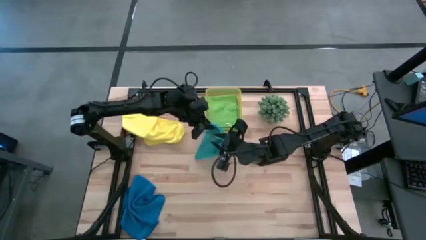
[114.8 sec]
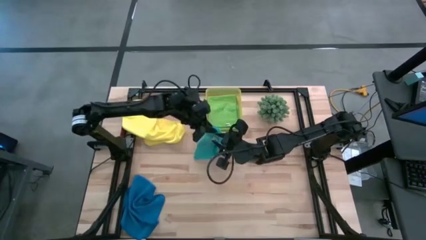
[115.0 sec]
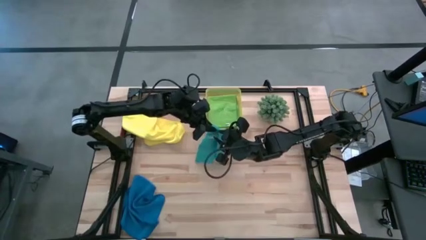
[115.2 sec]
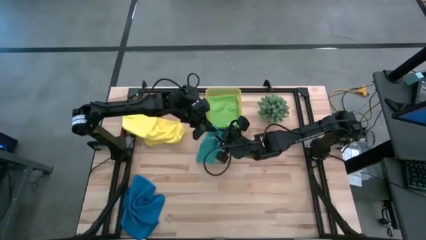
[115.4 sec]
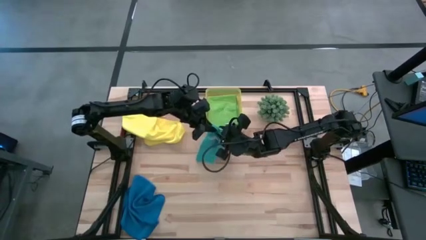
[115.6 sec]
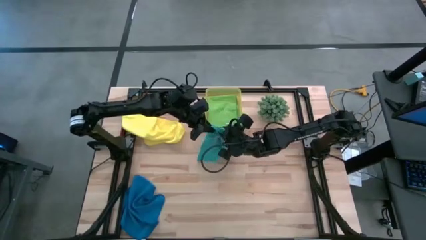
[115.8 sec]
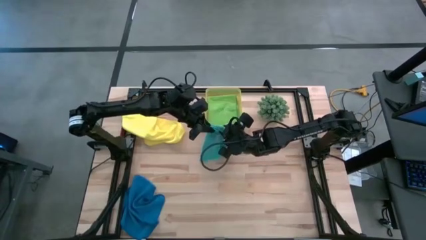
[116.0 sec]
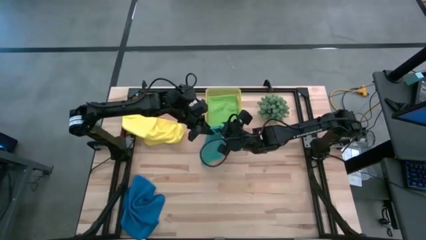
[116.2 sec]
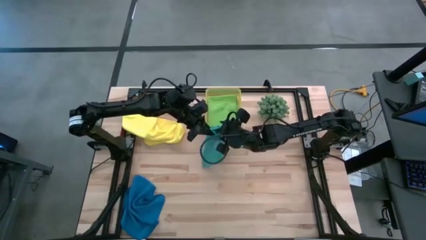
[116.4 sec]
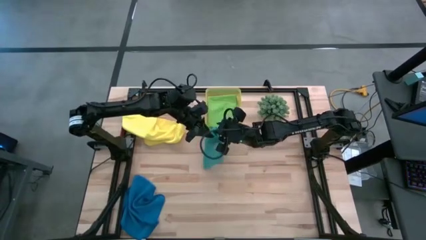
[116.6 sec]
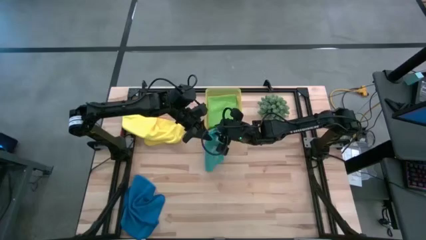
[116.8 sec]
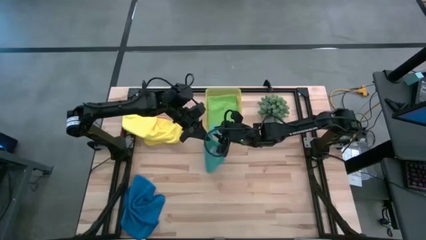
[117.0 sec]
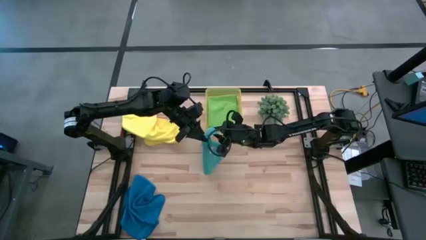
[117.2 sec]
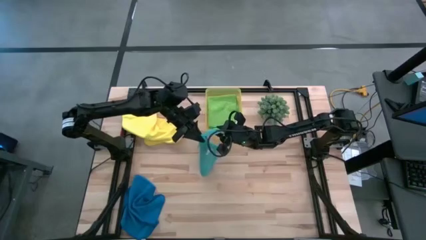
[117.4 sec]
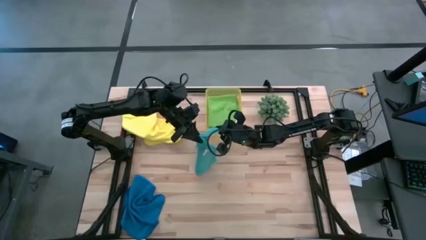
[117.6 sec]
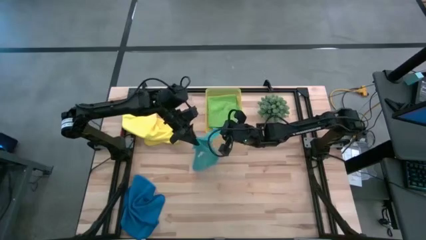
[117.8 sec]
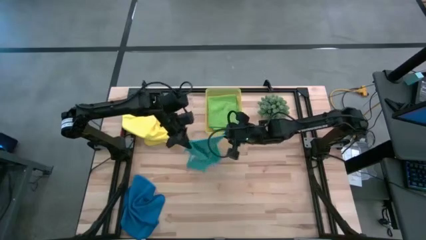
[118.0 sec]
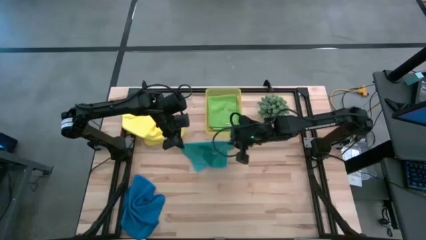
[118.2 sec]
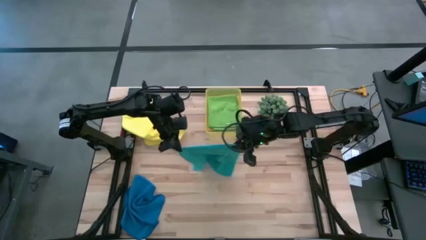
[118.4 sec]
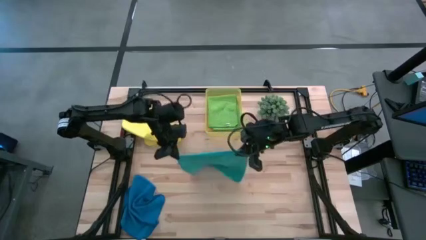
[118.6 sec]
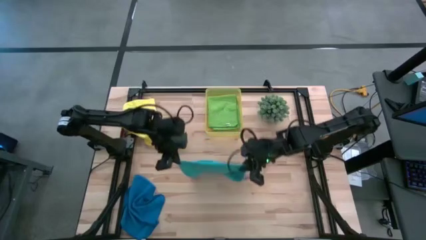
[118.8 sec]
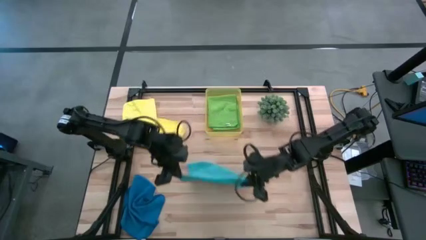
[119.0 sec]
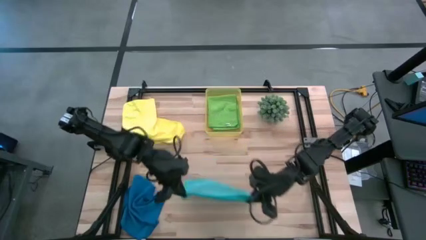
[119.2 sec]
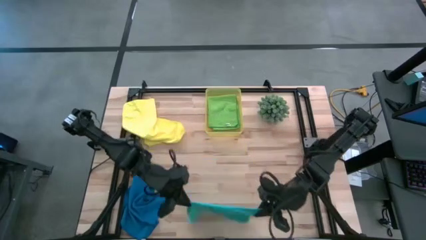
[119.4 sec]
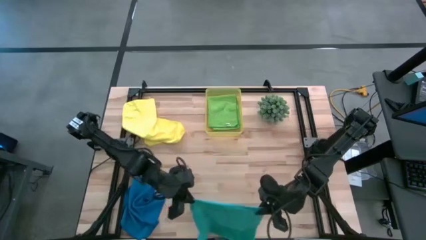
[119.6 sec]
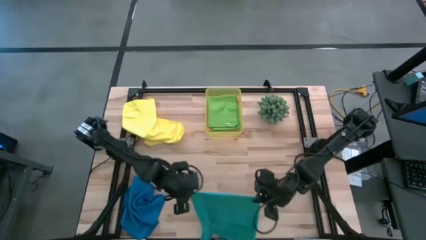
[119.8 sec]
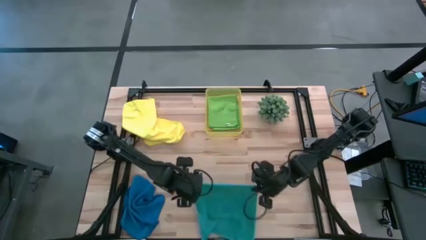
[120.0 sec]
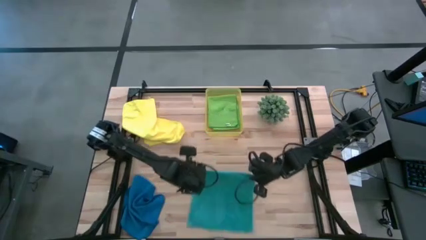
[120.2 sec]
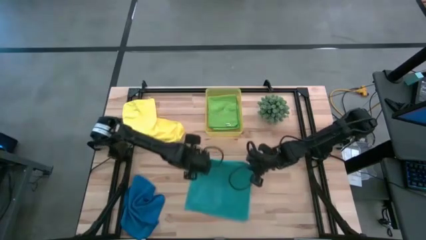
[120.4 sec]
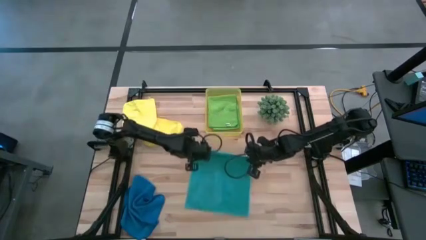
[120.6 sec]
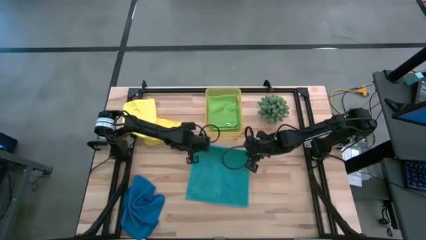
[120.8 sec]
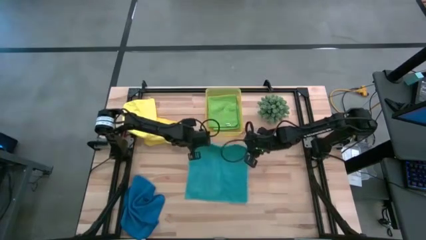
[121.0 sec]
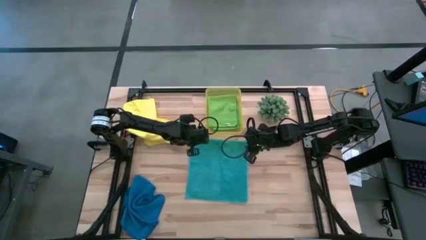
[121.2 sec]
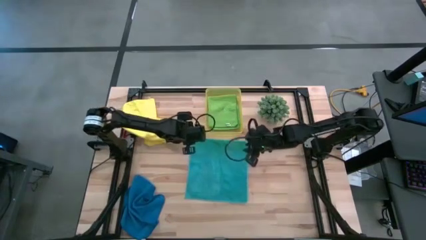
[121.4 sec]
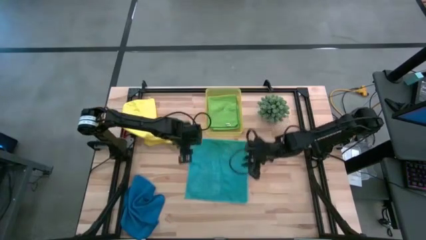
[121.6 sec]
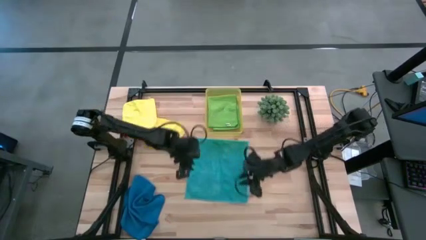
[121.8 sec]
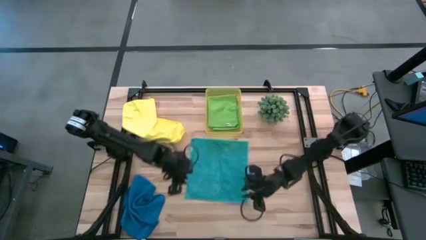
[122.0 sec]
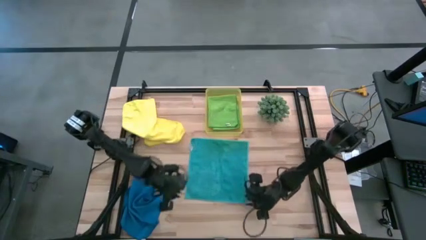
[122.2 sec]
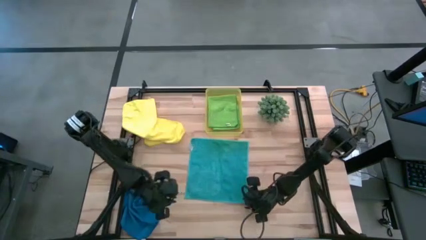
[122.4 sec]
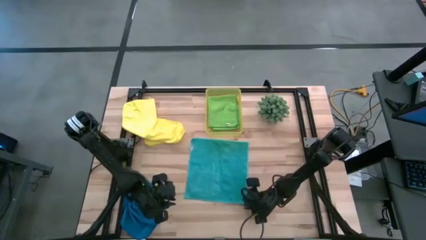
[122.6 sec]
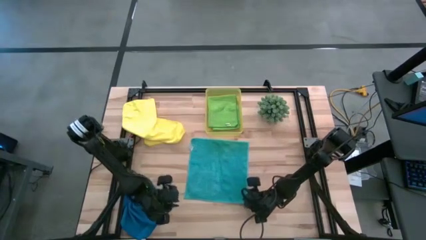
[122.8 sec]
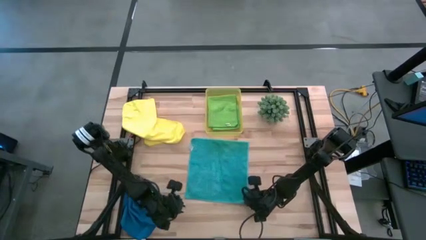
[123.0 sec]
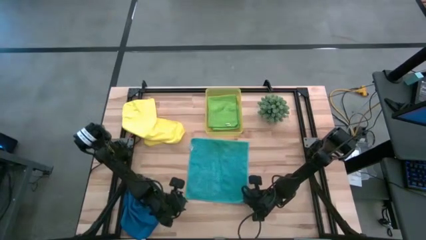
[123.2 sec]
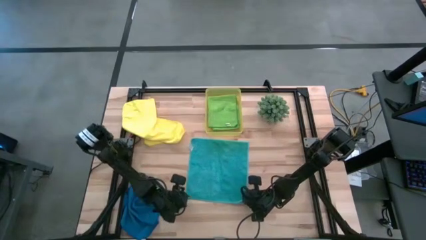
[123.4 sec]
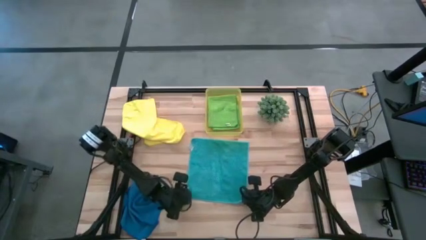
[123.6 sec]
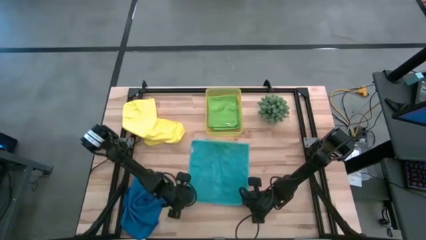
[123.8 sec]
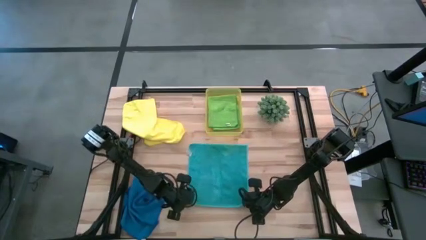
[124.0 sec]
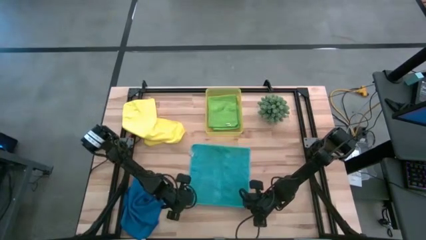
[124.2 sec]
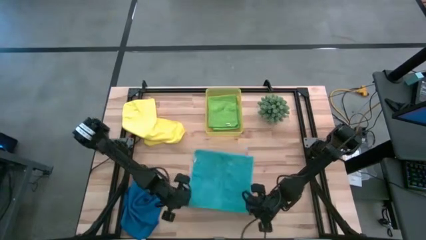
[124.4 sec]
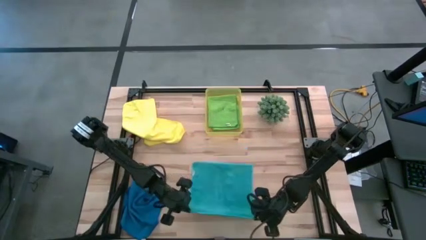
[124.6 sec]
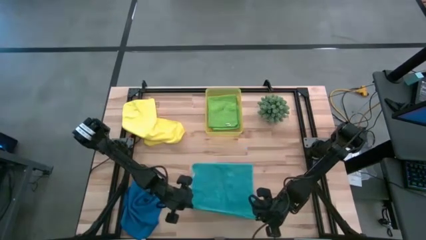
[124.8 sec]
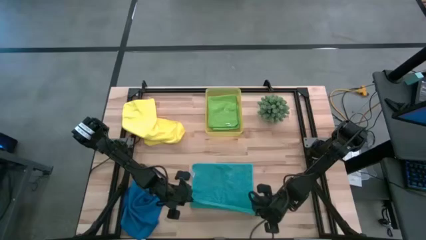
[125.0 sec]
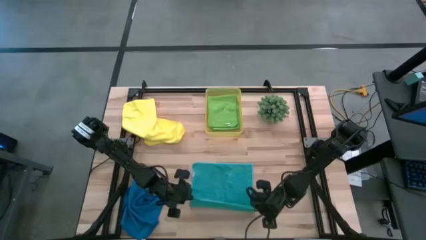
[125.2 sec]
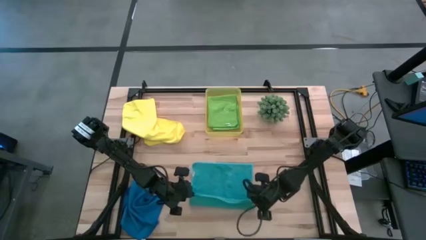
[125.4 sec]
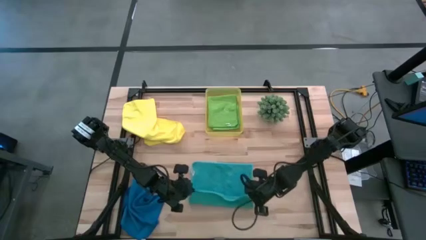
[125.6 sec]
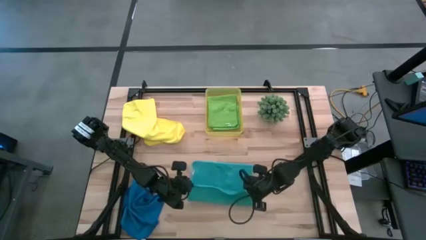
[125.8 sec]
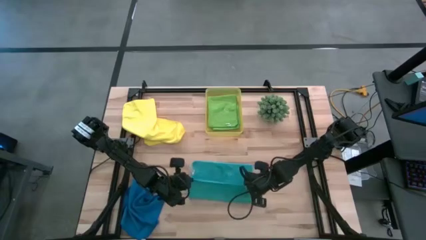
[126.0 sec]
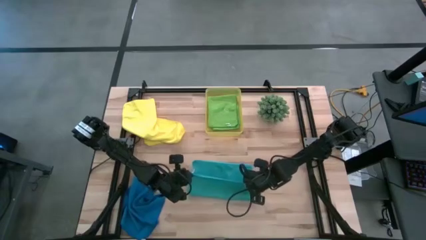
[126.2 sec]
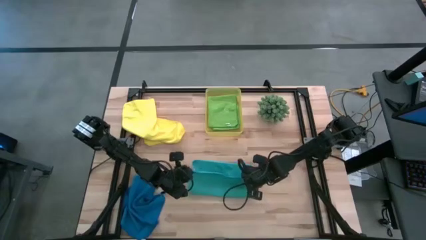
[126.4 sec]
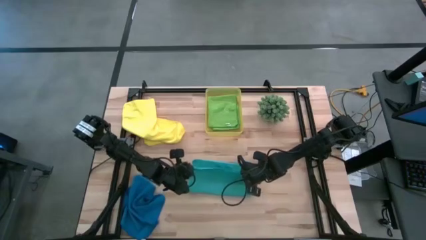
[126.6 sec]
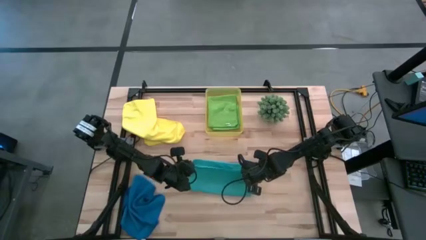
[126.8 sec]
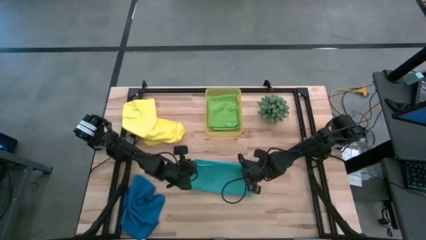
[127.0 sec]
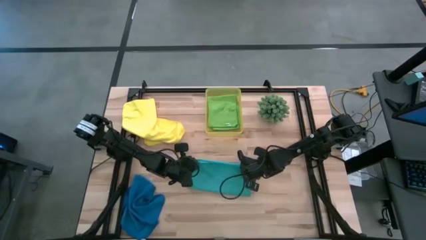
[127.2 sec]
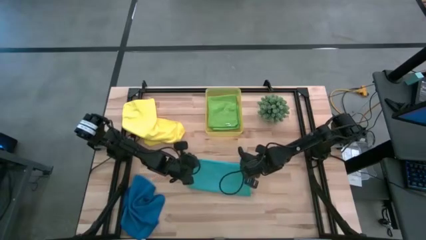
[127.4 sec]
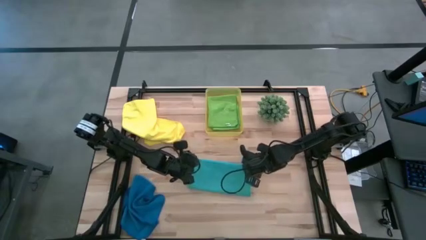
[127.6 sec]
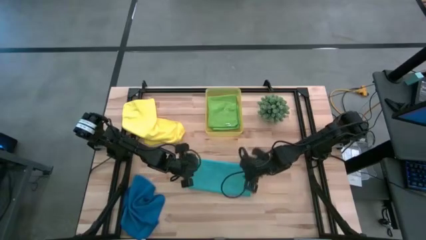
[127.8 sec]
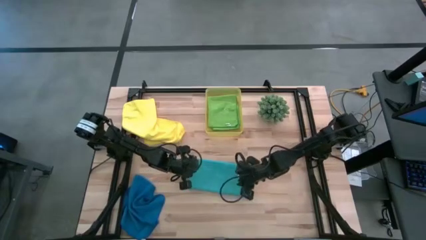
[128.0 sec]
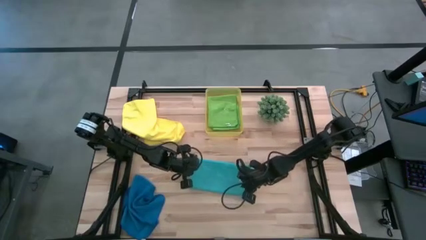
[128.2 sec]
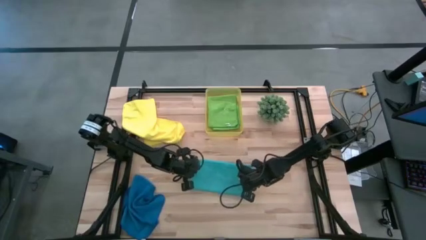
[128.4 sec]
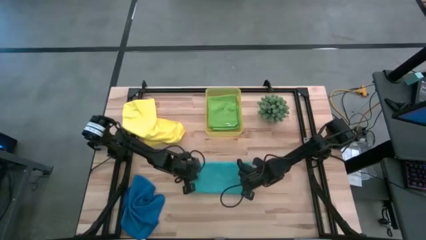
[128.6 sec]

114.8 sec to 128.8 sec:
Task: Fold microfiber towels
Fold the light blue microfiber cloth

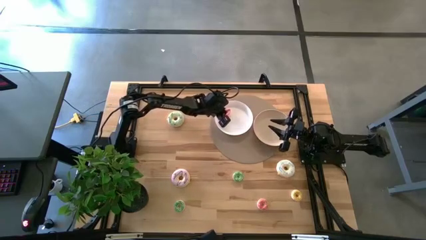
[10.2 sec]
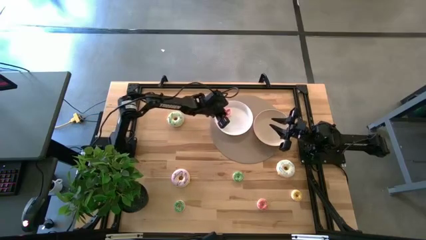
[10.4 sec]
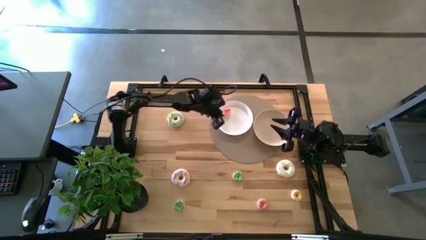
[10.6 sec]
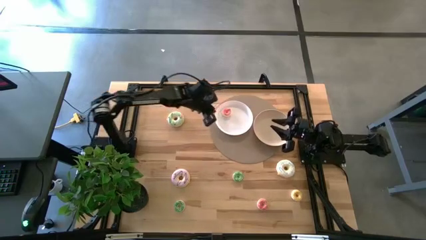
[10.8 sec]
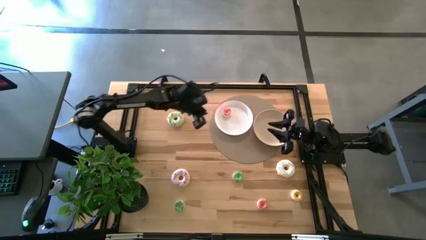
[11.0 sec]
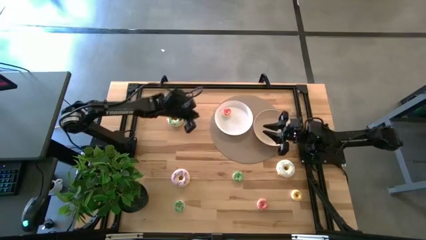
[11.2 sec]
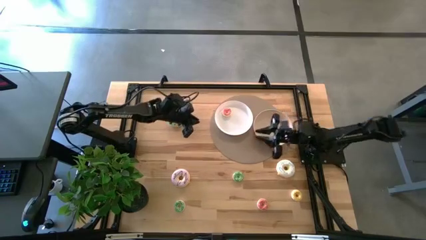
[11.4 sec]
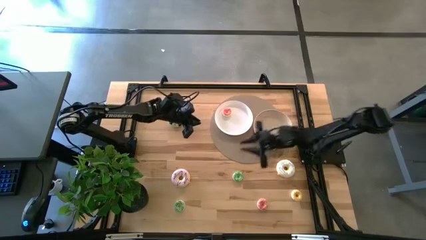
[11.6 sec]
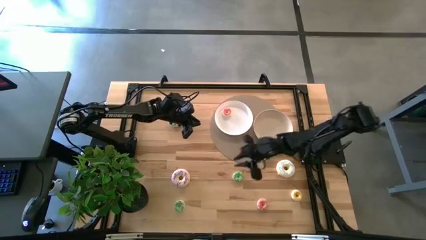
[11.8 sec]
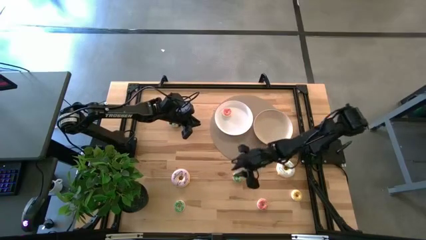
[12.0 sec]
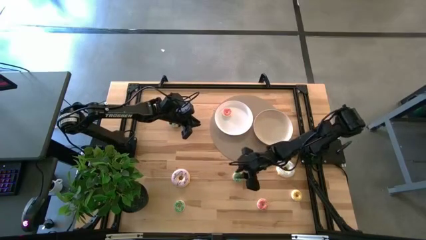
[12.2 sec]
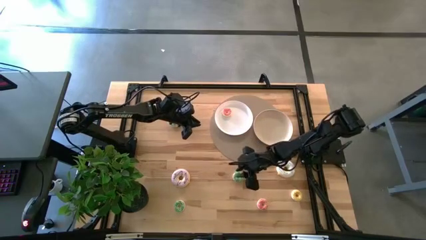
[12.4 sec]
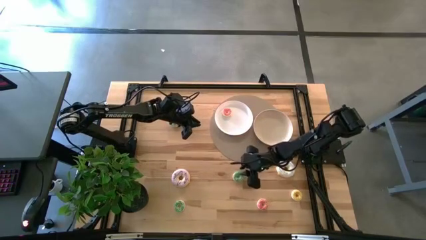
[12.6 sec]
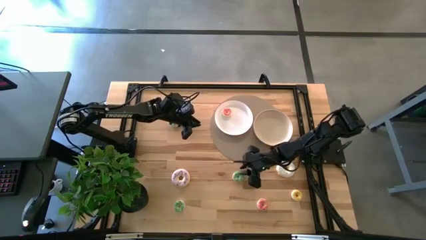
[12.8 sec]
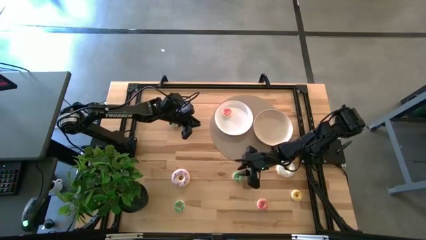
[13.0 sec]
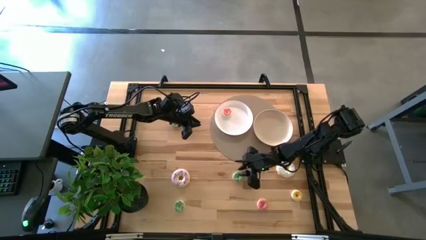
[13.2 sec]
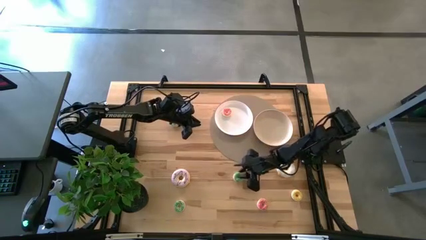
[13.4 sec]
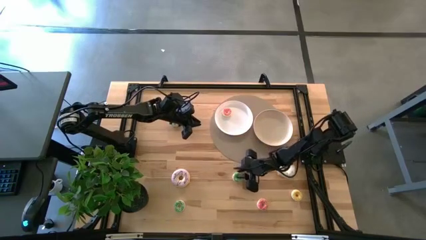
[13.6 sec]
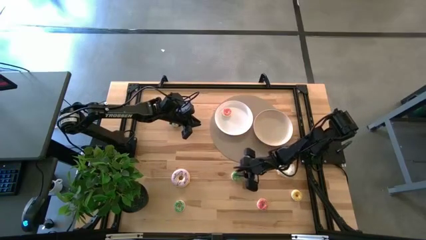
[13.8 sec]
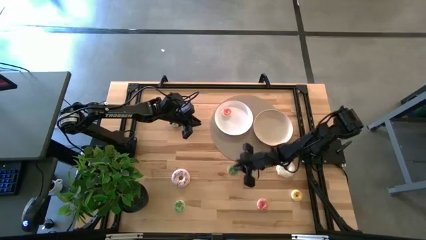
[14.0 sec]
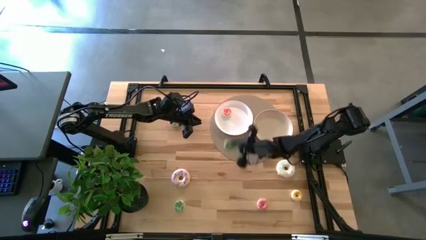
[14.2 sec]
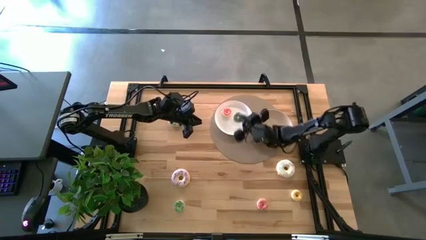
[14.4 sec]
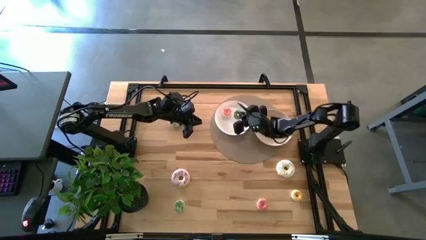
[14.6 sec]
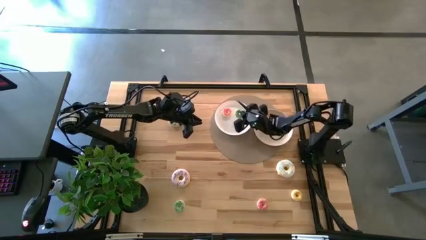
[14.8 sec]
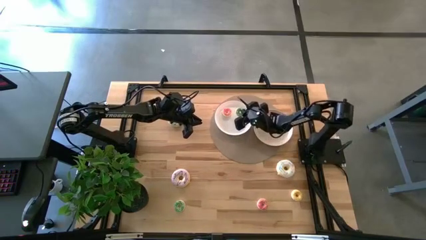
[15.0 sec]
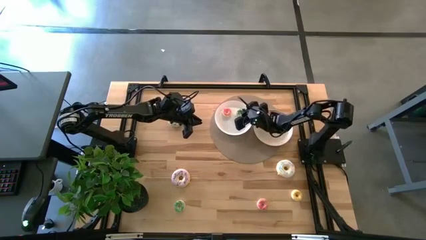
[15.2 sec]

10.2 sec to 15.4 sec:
Task: Pick & Place donuts
Put the top small green donut on the white plate
